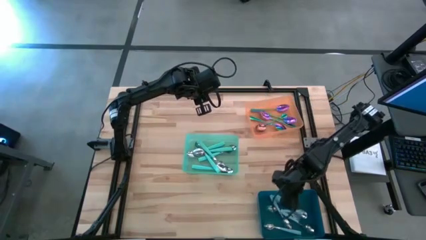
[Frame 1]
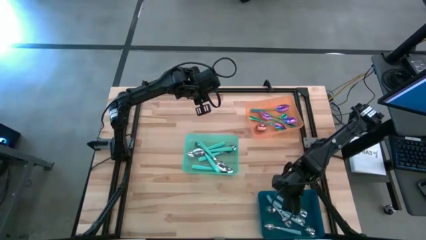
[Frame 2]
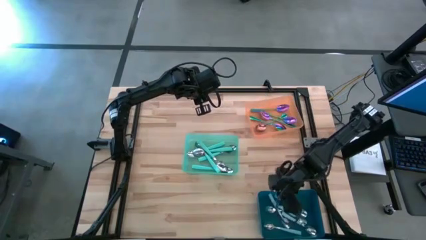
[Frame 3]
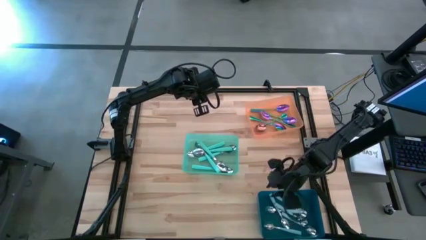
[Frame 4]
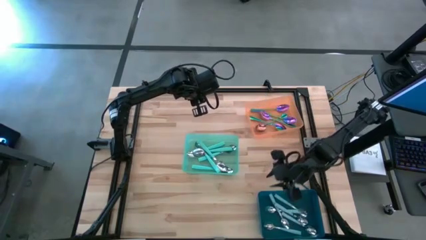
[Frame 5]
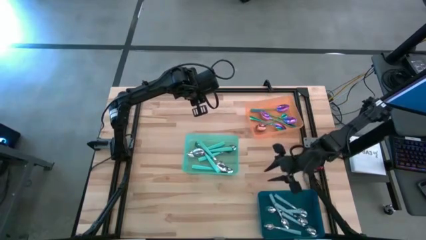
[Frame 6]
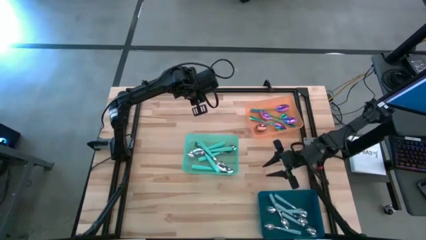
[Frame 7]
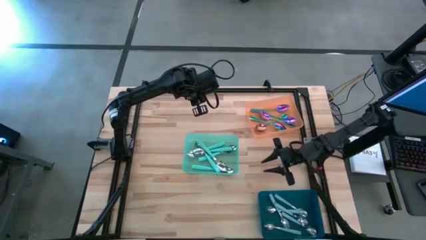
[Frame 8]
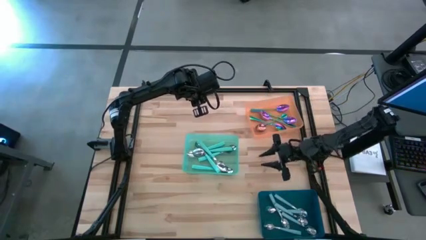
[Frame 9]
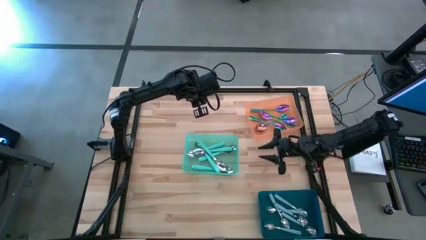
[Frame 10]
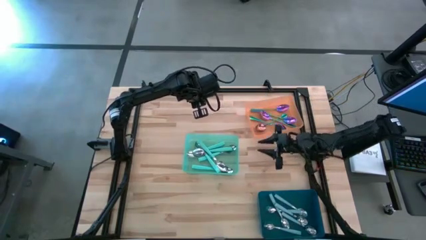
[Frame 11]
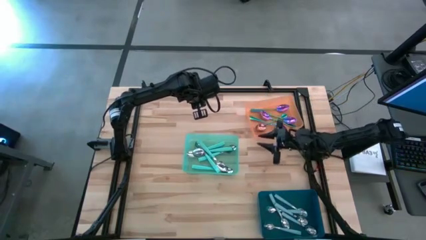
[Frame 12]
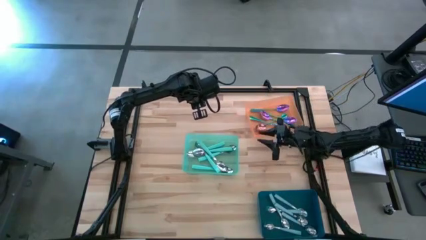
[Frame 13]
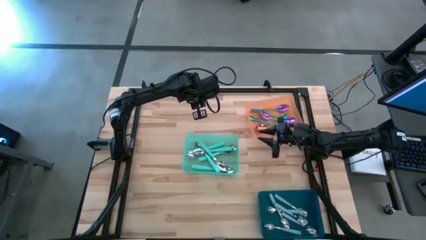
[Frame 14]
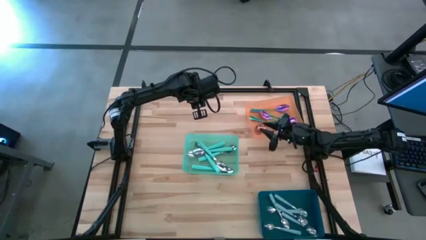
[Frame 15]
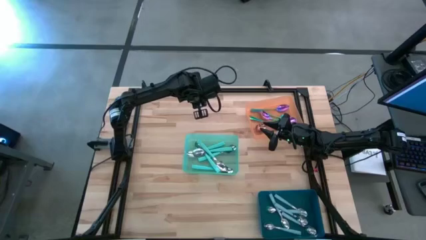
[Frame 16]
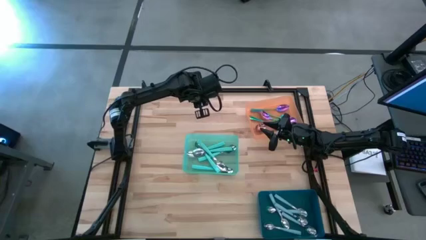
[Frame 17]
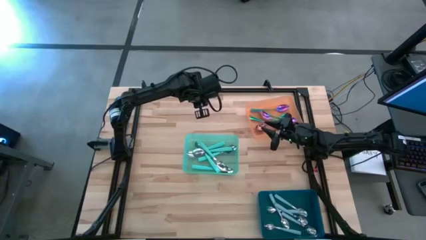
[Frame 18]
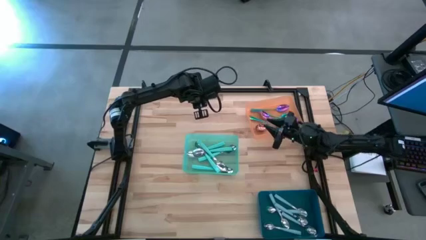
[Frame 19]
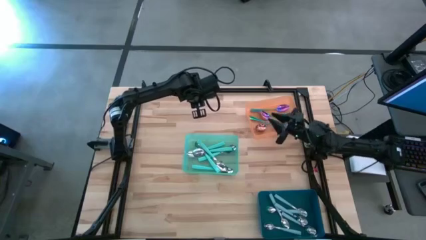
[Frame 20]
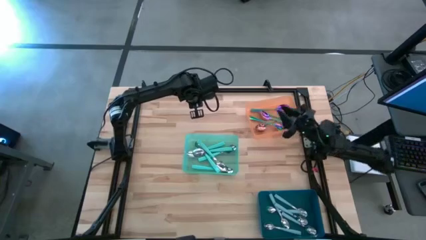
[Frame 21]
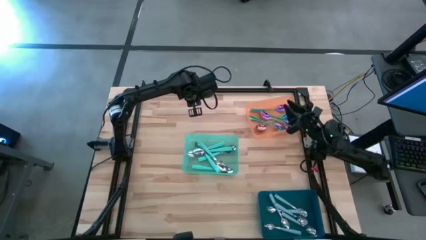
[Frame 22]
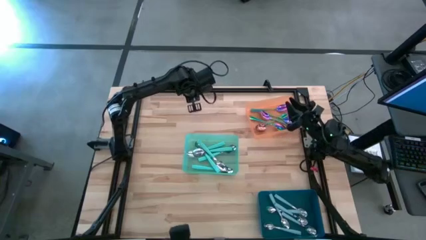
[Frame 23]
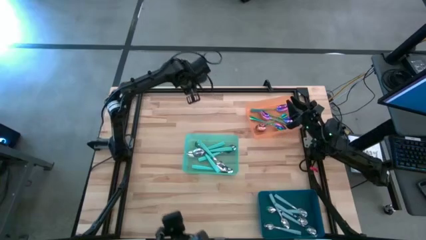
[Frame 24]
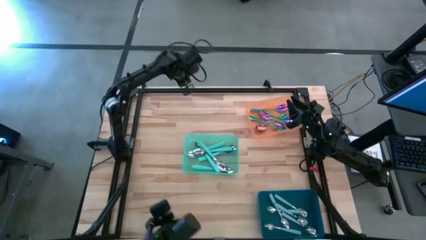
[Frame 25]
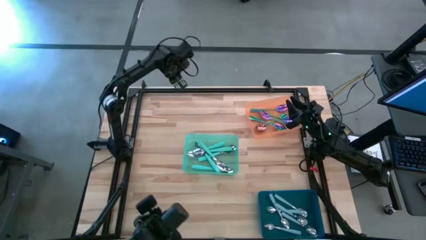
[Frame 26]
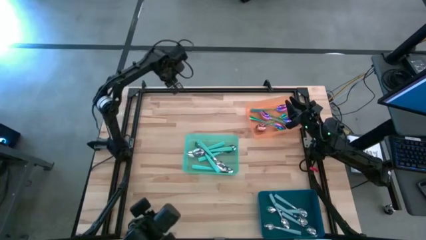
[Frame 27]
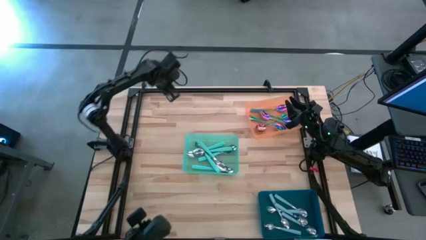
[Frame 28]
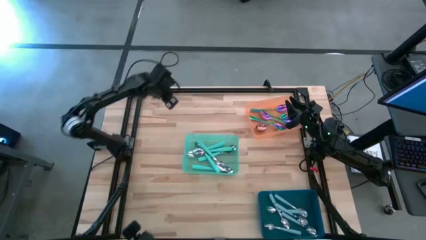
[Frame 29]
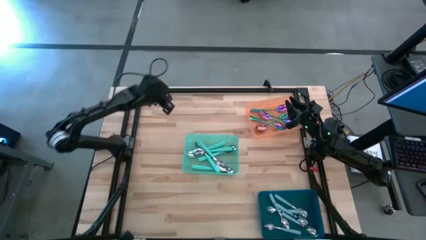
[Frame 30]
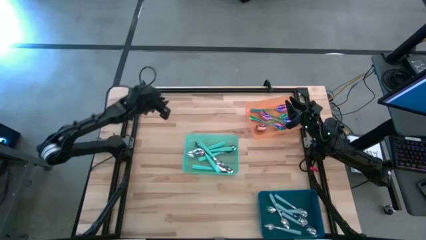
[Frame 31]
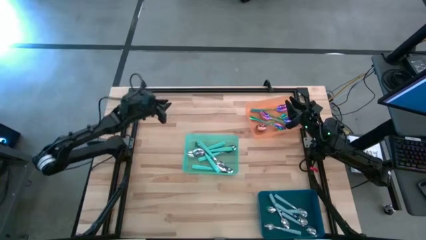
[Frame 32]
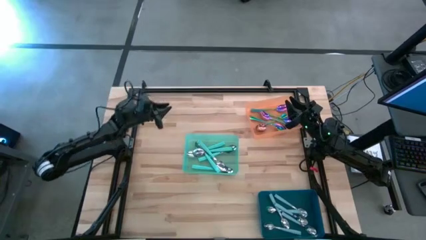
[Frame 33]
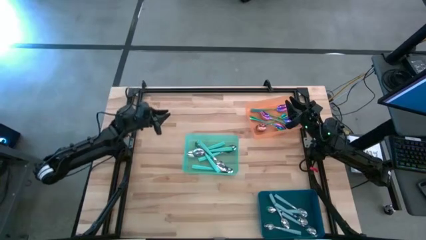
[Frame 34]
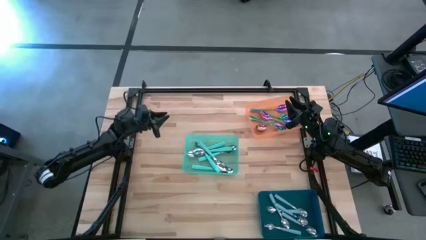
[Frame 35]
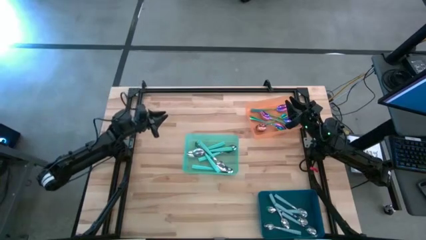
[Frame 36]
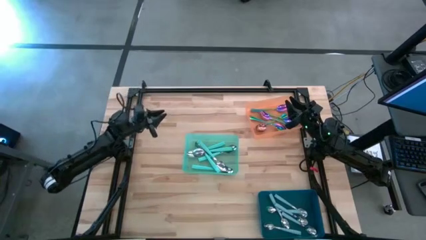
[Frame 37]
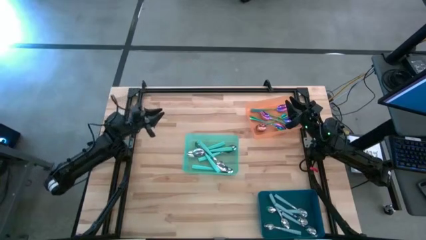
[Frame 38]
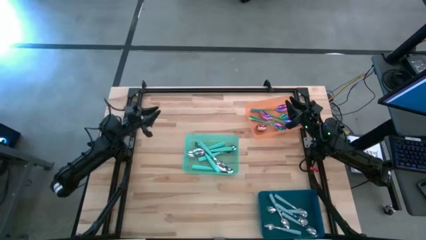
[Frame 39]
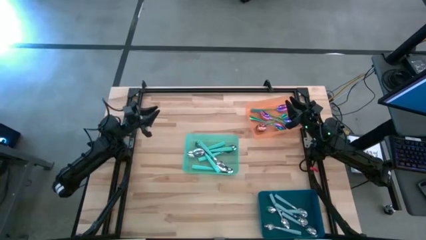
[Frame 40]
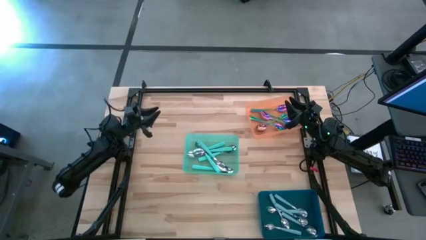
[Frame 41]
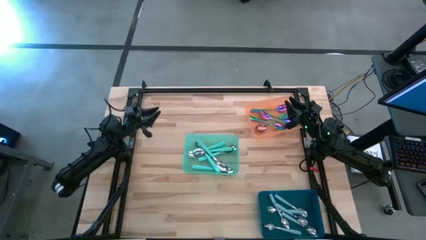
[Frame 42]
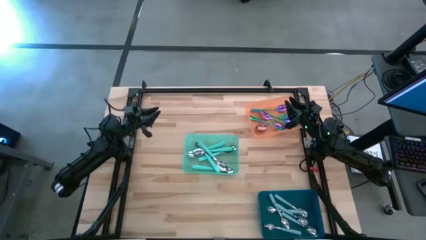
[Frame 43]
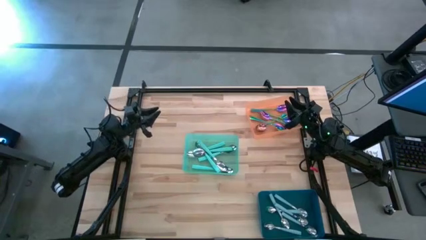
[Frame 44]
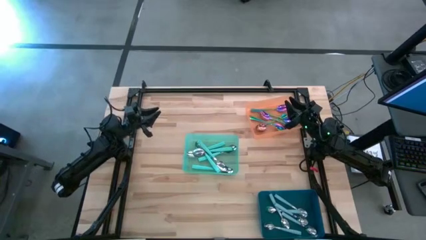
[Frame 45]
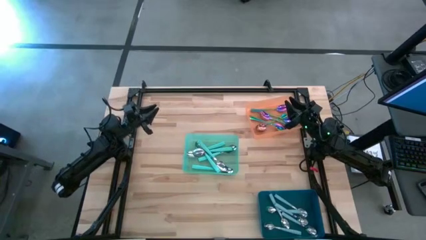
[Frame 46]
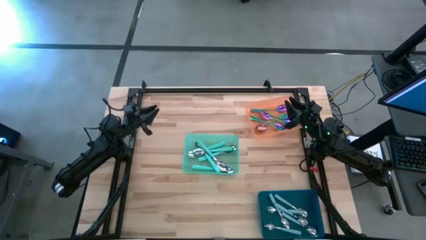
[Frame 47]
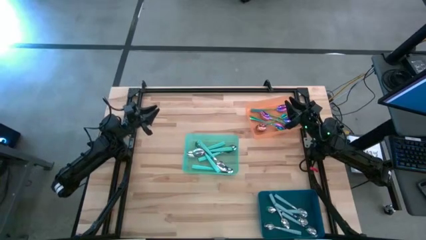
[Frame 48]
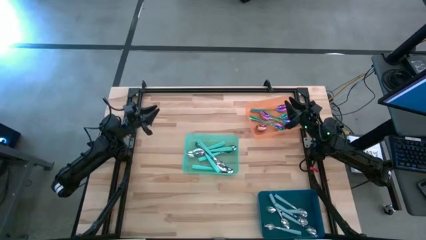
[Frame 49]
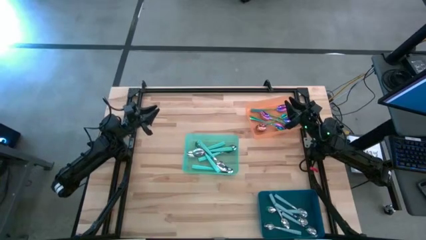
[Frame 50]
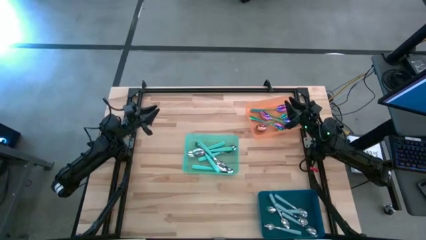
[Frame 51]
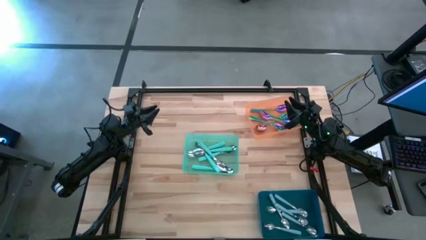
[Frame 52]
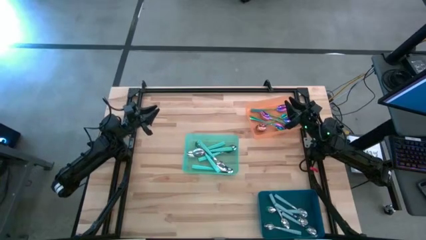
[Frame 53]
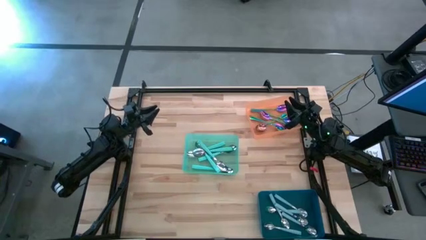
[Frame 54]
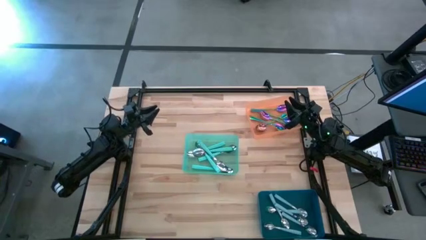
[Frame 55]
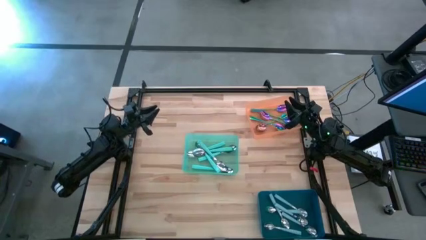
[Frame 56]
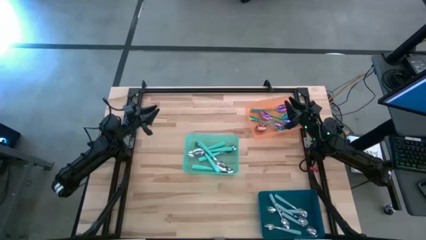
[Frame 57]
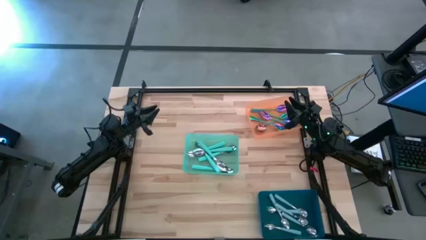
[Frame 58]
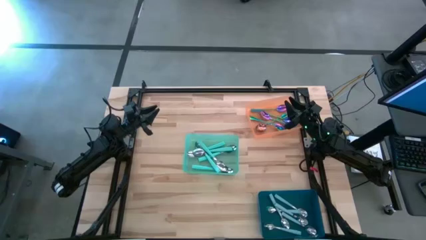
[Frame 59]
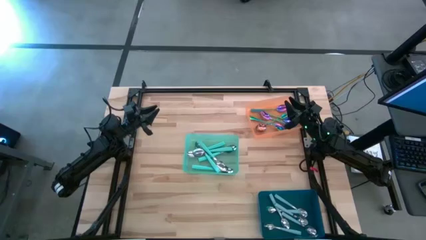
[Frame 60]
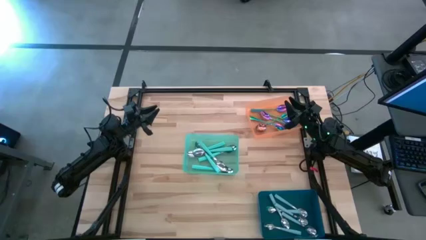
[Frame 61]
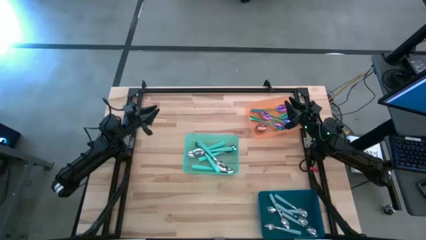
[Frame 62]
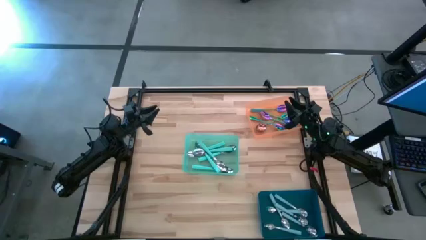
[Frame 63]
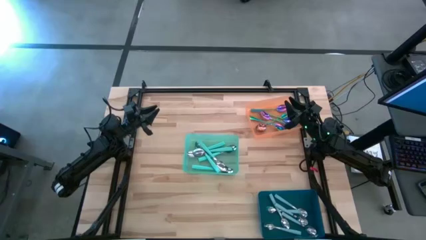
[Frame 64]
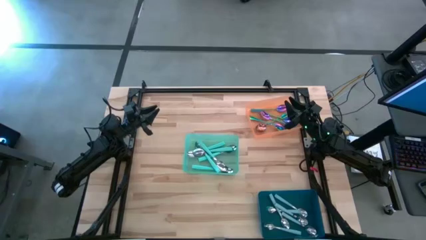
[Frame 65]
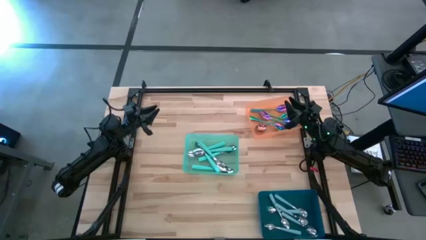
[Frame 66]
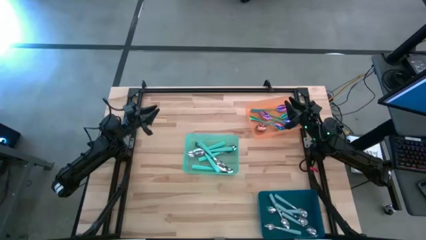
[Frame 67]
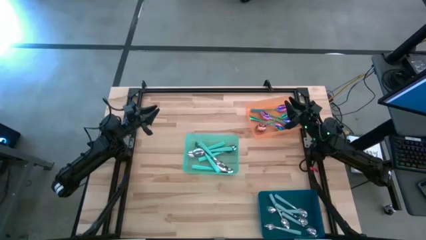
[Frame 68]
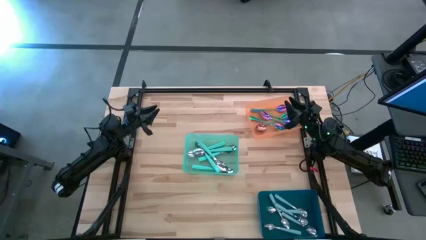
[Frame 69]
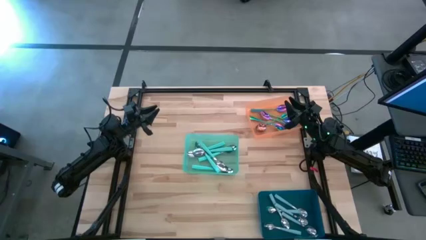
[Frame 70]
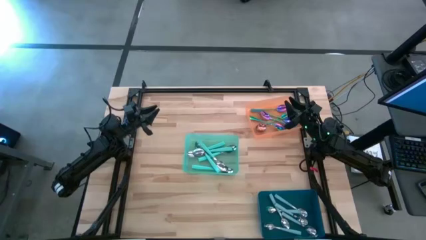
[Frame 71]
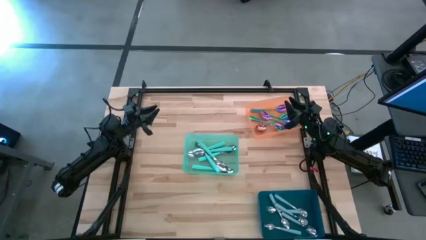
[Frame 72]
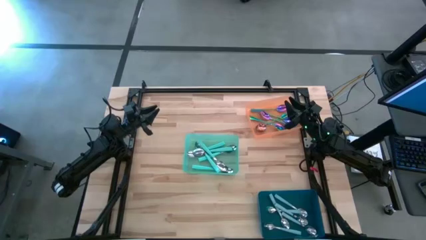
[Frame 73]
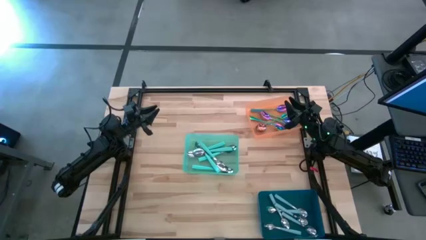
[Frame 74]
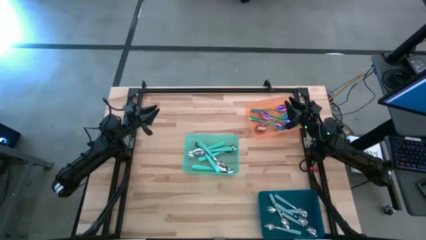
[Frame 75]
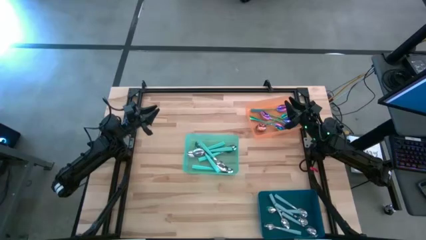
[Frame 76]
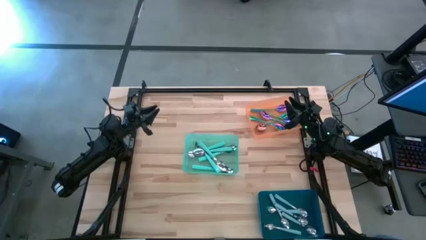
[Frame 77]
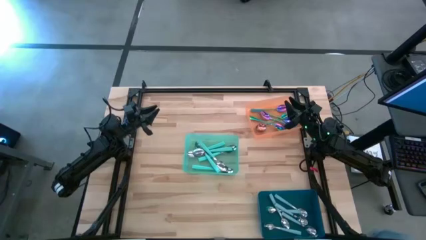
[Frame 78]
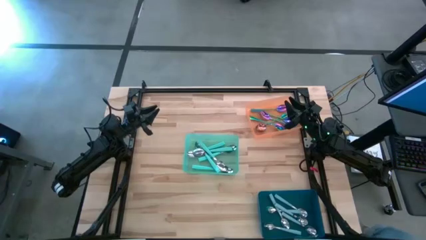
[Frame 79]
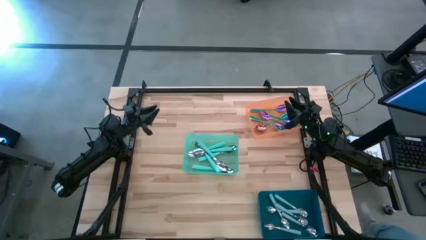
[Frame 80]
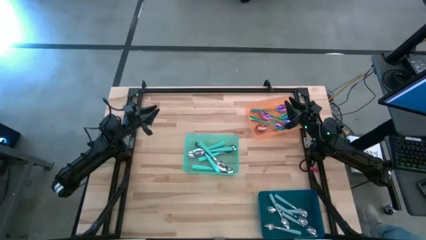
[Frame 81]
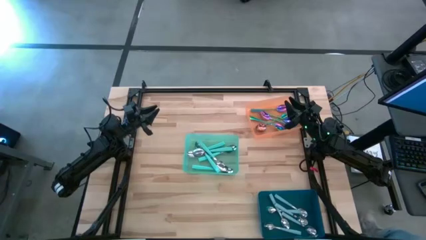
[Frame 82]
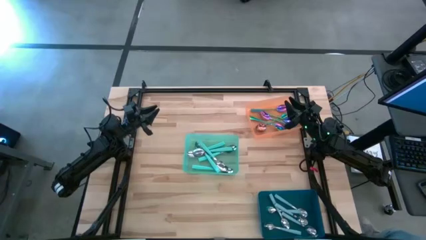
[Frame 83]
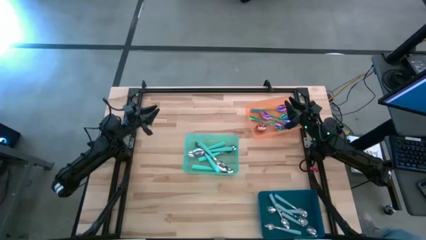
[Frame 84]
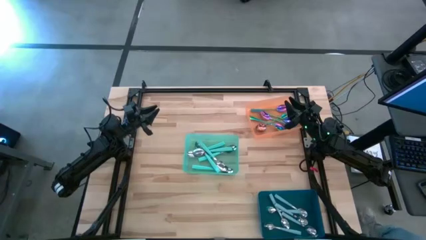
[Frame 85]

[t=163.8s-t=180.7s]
Task: Sort silverware by color (type)
Return to Home Position
